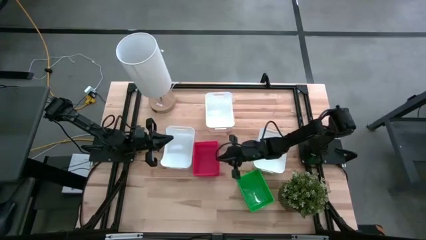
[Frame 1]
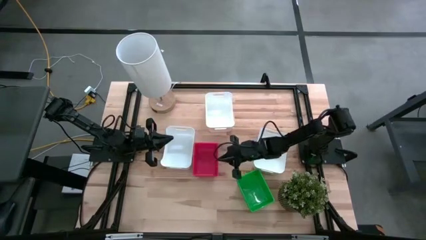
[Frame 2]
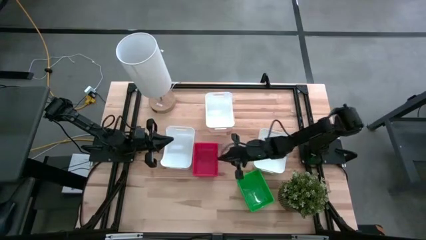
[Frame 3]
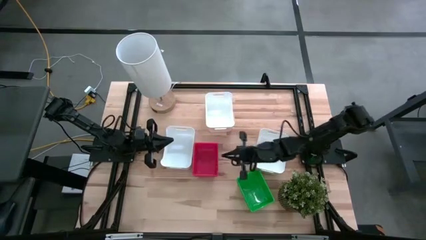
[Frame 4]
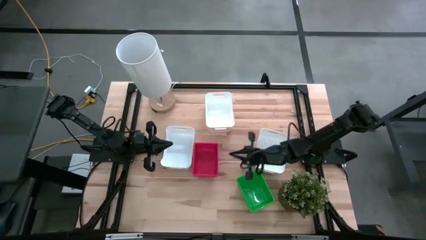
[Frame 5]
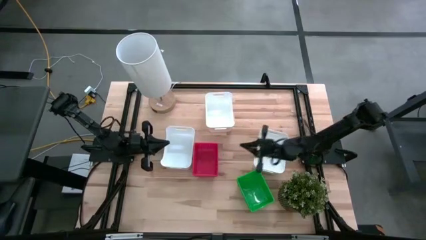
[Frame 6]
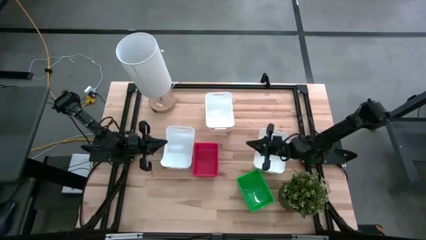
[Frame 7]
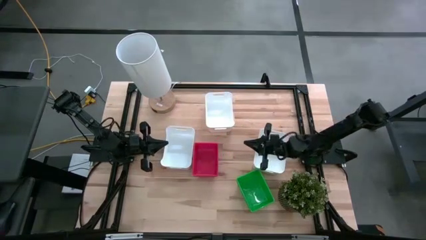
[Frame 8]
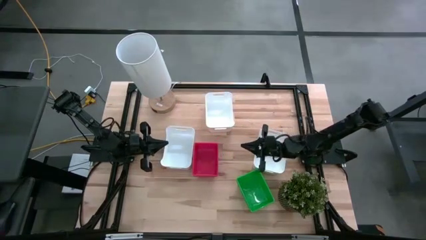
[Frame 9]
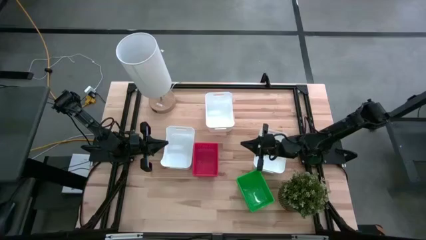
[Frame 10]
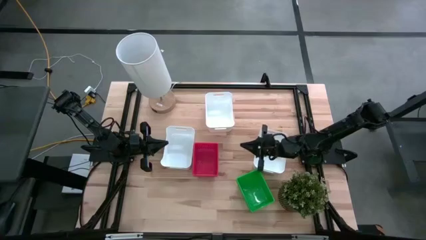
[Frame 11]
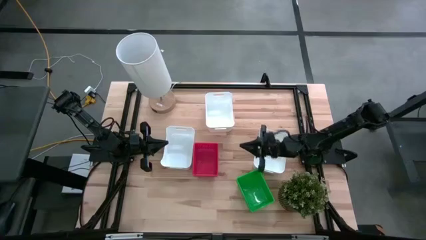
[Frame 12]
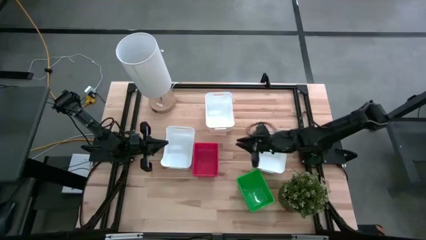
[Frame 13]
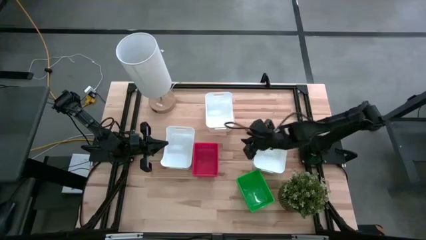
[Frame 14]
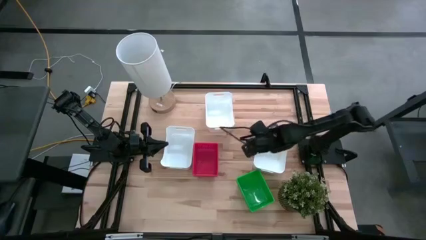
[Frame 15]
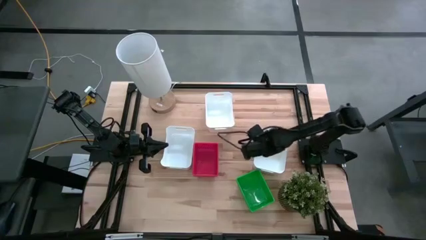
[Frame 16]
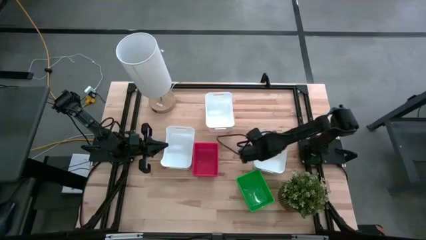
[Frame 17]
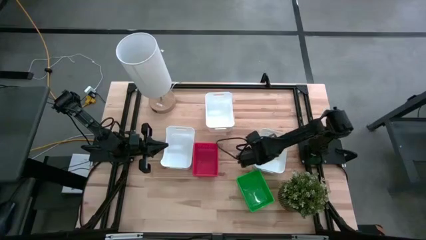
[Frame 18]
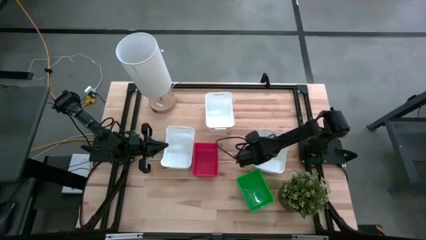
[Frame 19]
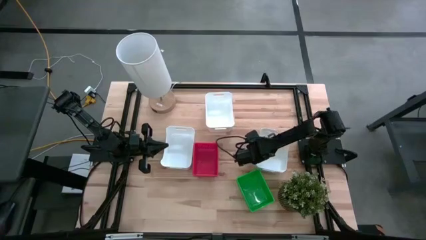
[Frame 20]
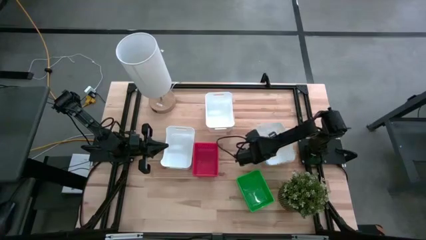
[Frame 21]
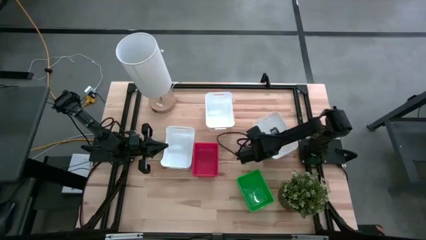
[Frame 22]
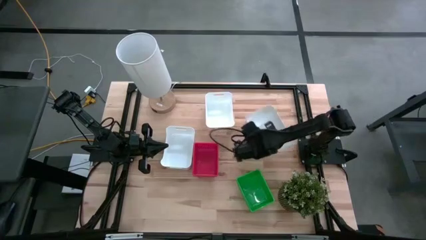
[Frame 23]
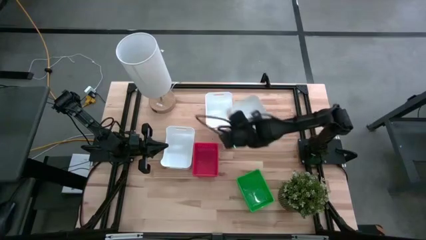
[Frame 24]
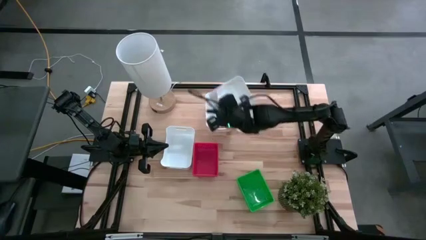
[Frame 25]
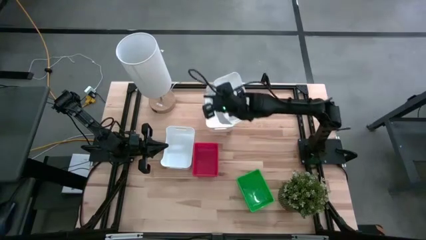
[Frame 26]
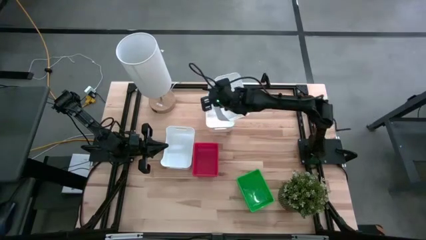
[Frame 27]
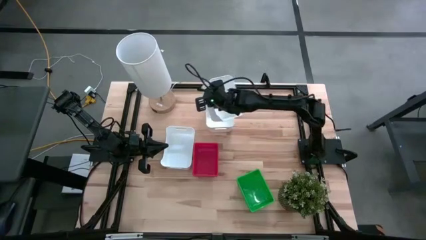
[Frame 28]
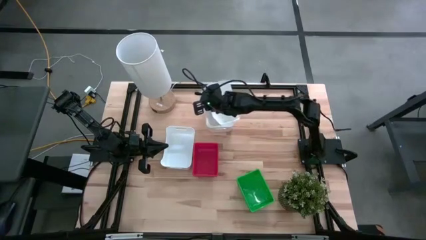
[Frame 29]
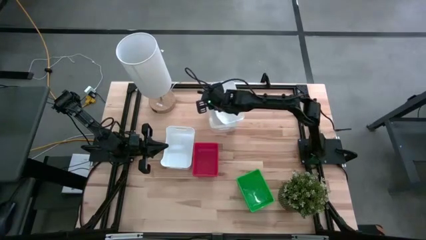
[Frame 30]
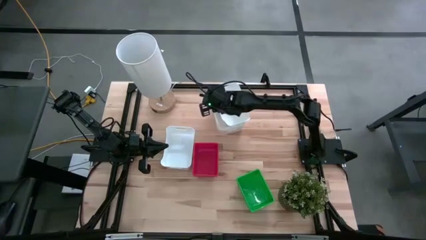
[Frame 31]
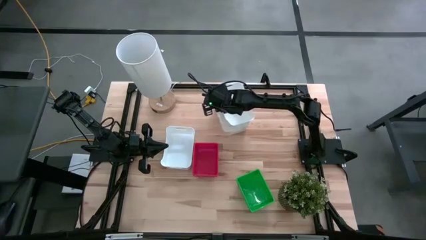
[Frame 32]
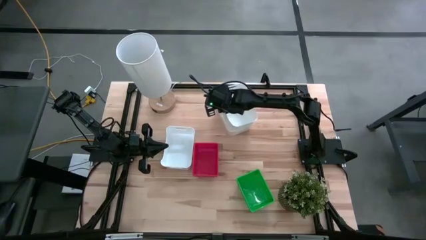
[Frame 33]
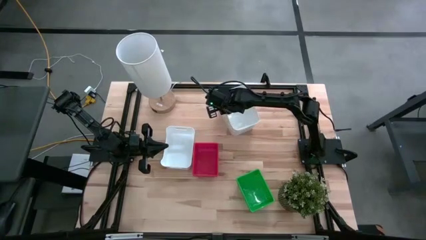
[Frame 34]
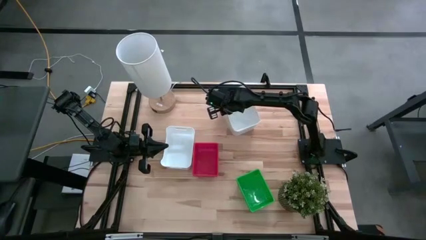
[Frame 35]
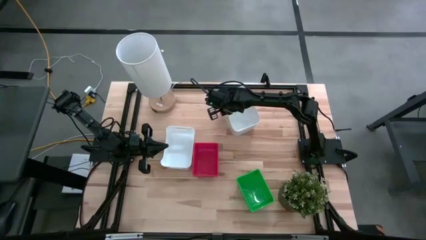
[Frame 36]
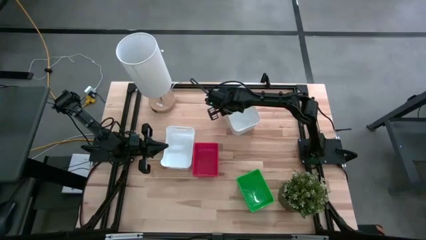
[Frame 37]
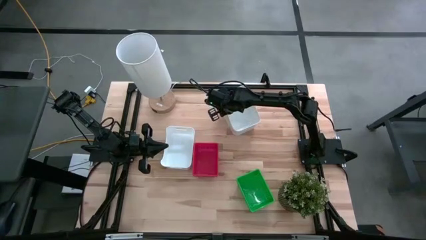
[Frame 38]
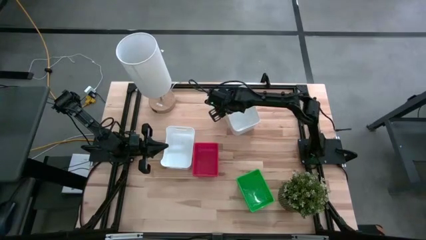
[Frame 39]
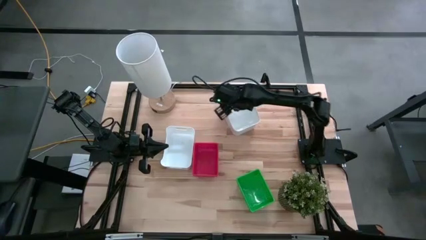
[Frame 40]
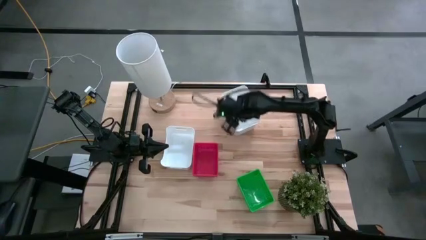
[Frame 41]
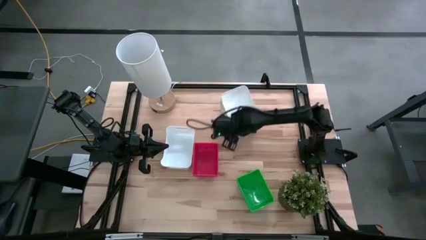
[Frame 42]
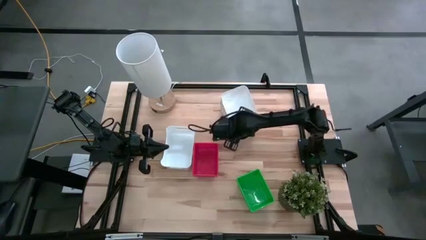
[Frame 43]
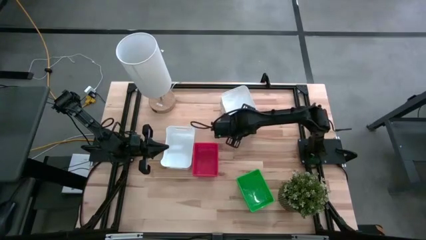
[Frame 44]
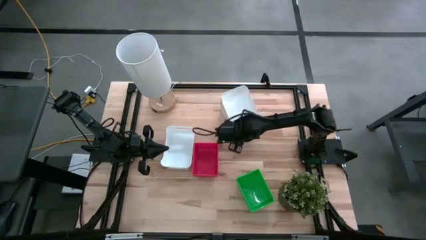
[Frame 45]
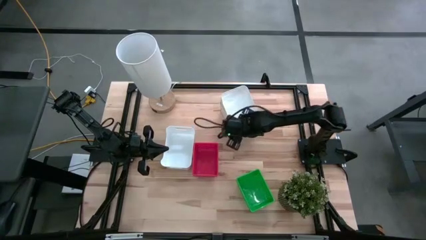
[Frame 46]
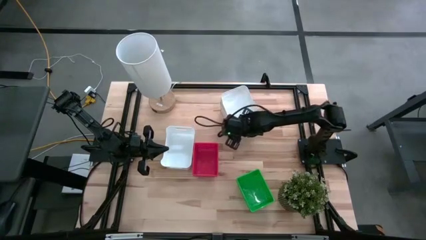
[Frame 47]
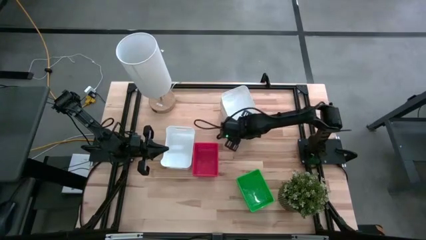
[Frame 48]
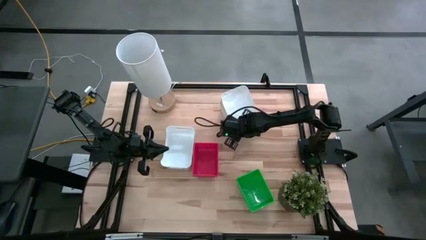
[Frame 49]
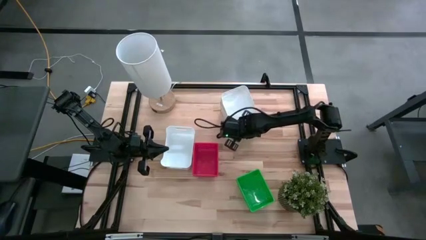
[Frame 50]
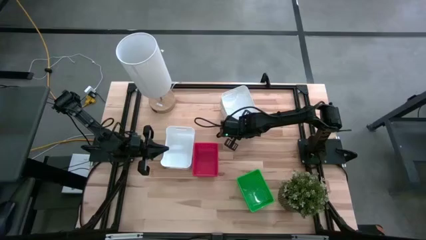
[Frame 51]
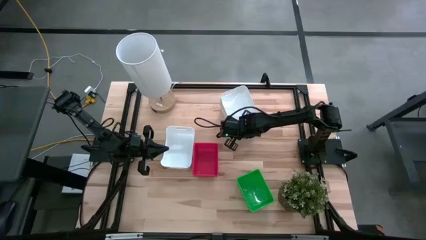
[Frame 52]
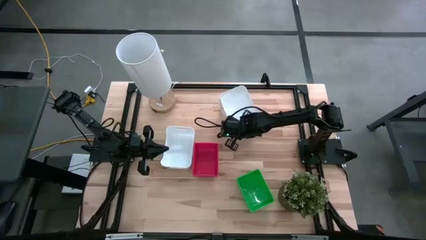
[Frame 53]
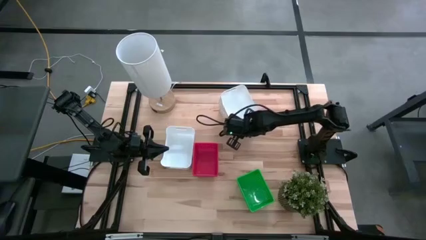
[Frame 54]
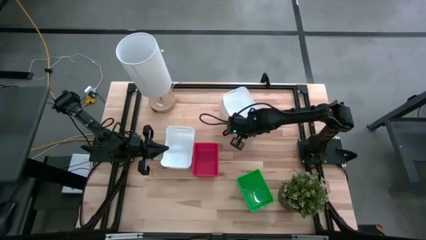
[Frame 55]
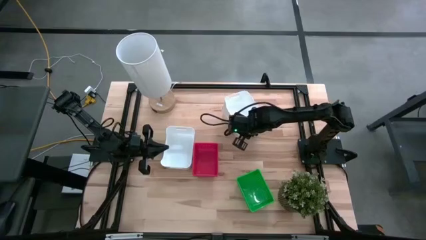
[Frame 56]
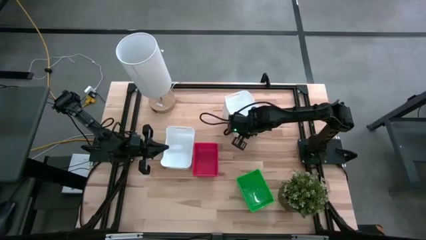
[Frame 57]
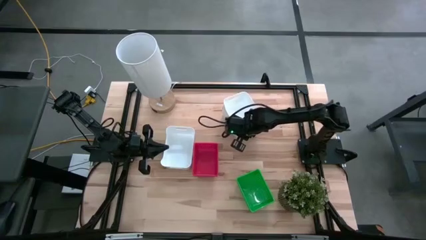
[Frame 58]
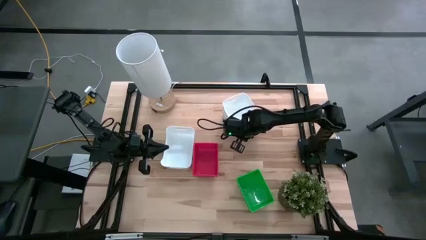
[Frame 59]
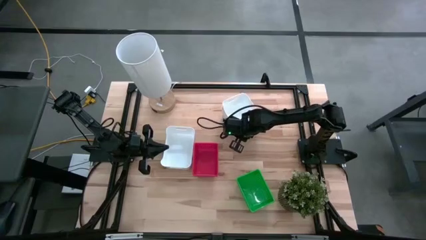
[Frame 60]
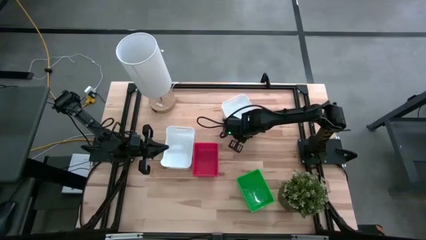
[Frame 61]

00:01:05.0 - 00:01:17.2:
Stack the right white bin on top of the top white bin

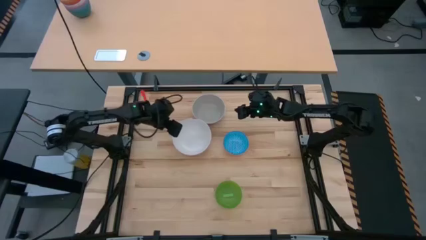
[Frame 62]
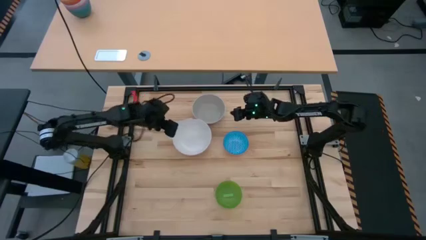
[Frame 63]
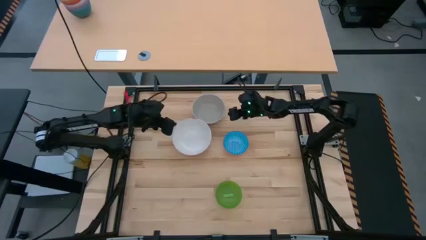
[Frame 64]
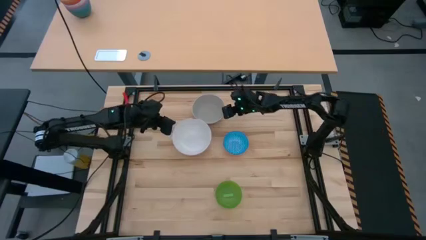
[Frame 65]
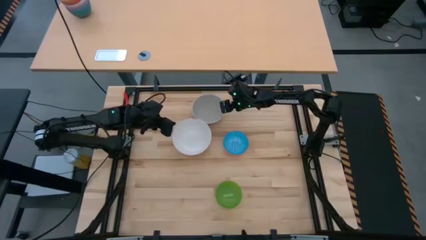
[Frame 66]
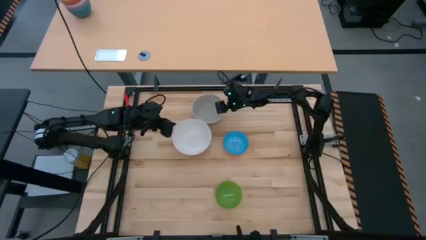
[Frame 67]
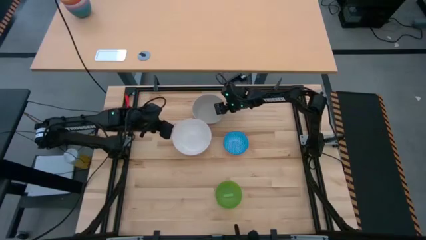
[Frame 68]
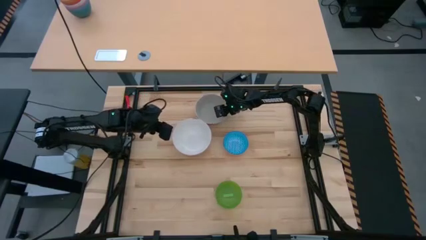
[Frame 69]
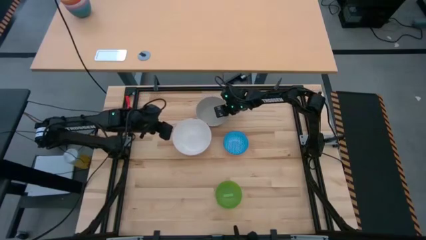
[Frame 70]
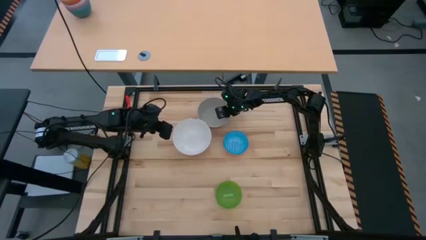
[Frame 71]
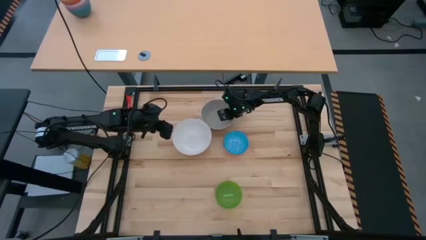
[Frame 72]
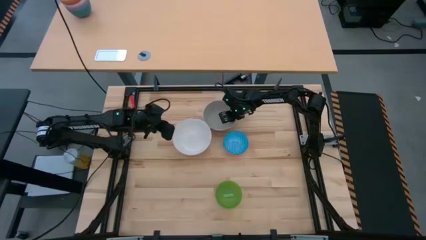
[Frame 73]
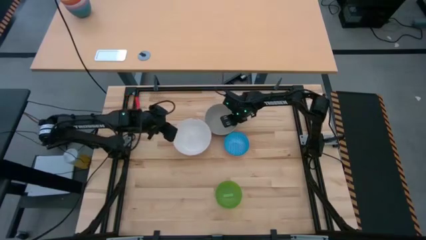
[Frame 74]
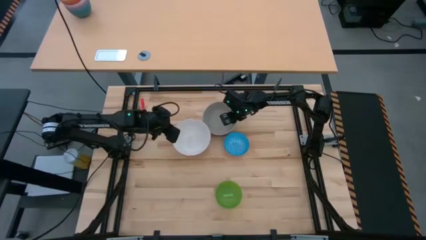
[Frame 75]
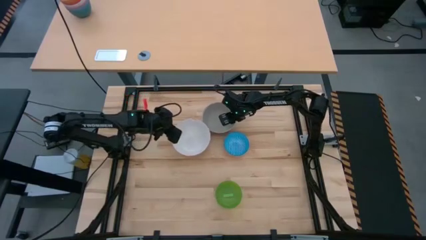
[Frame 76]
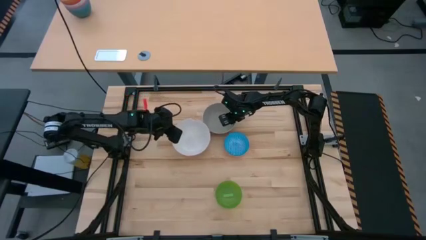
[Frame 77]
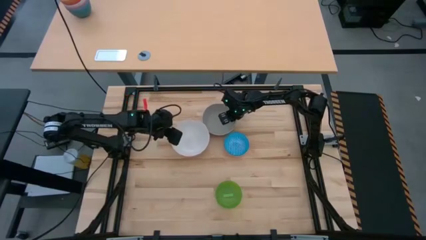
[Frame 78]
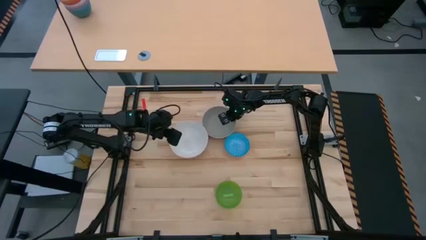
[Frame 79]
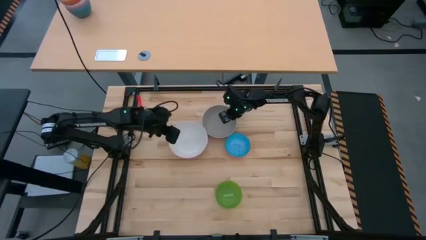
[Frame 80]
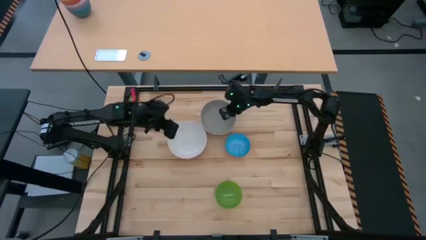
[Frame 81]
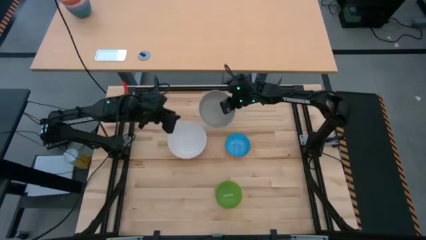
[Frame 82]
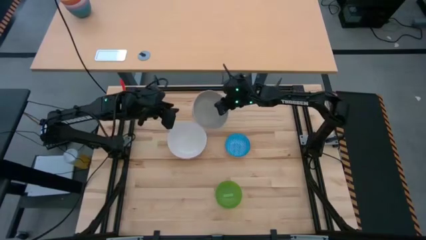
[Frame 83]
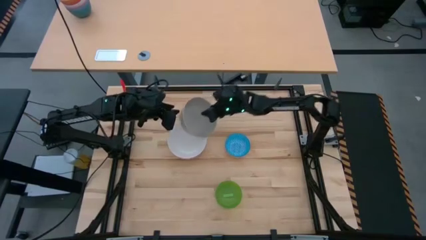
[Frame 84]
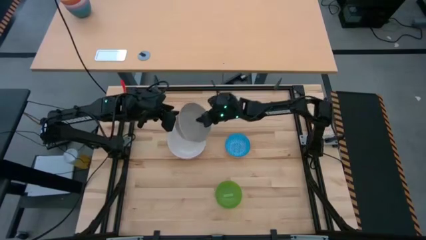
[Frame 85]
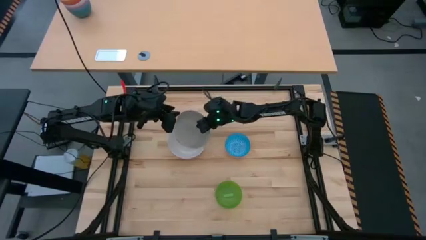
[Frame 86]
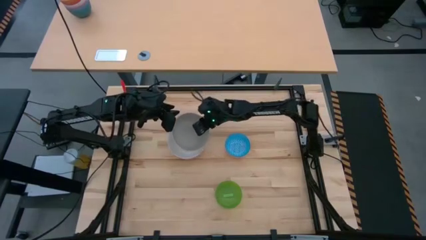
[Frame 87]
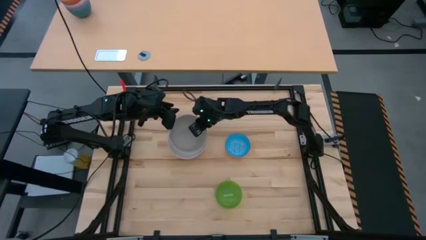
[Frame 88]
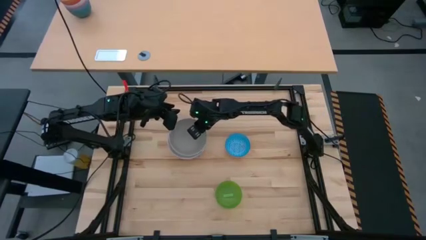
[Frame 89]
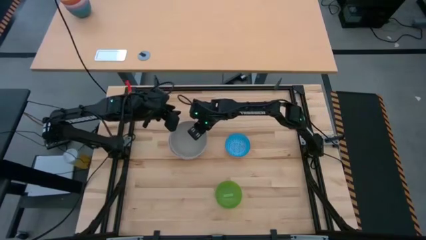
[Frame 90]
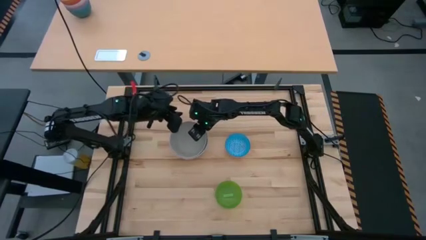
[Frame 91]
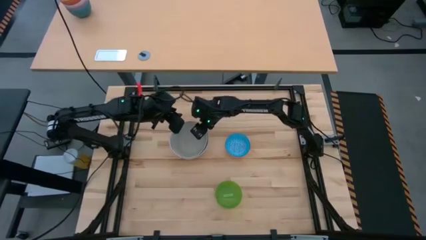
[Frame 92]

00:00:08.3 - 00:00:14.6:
Stack the gray bowl on top of the white bowl
